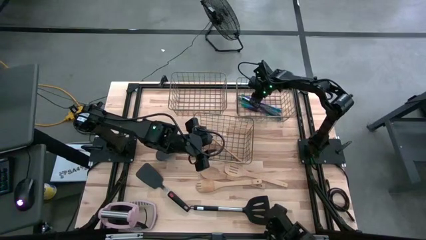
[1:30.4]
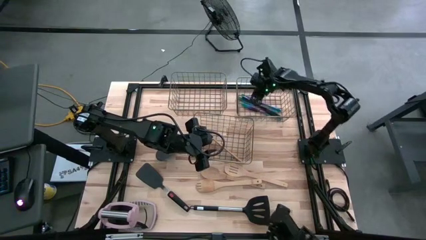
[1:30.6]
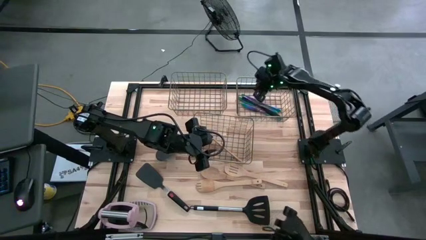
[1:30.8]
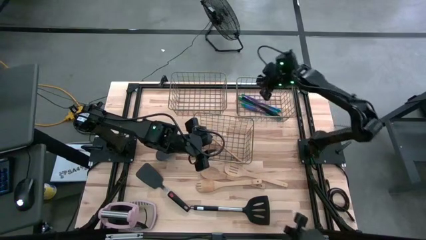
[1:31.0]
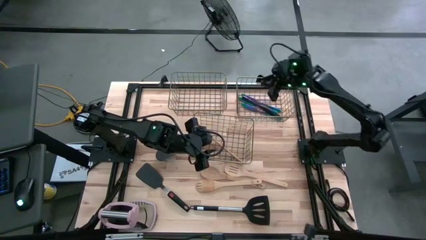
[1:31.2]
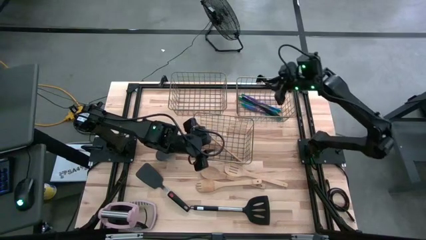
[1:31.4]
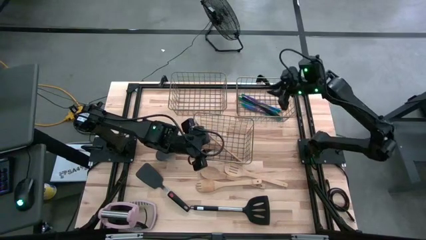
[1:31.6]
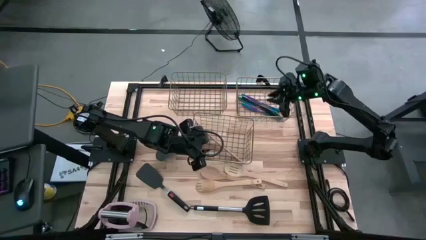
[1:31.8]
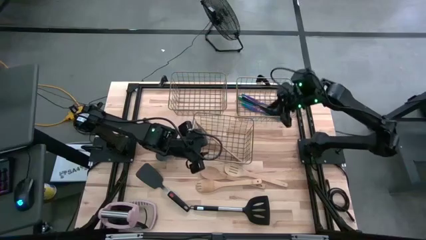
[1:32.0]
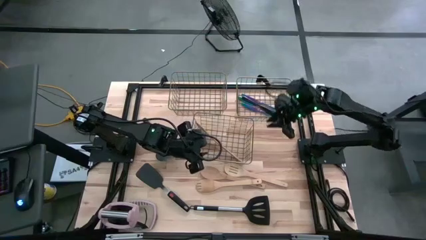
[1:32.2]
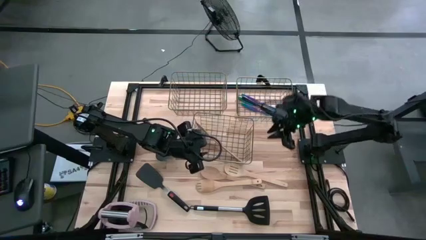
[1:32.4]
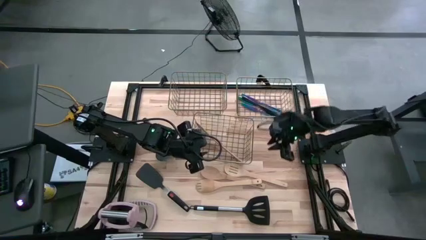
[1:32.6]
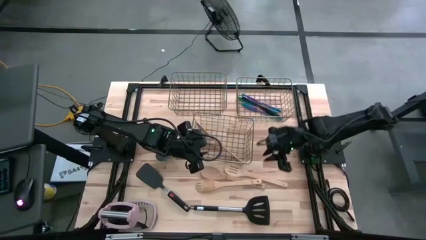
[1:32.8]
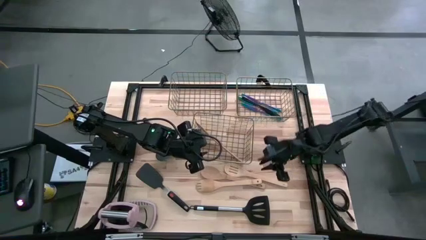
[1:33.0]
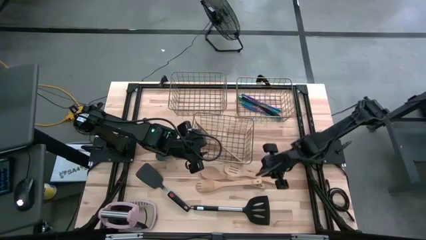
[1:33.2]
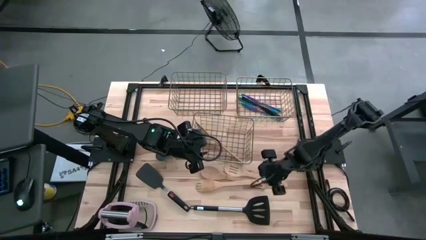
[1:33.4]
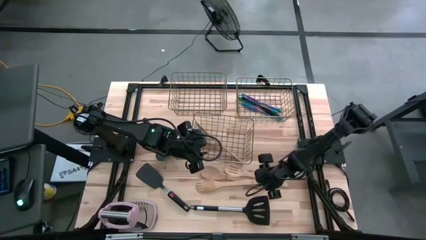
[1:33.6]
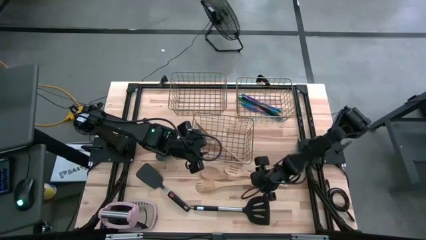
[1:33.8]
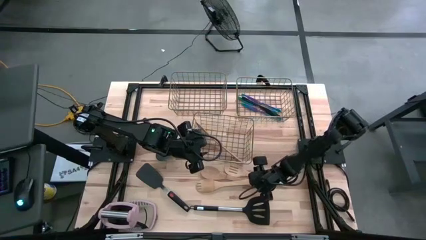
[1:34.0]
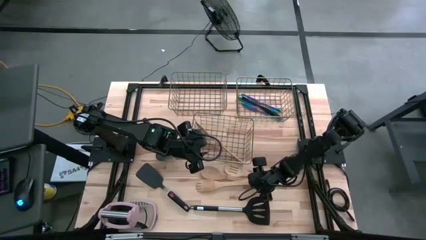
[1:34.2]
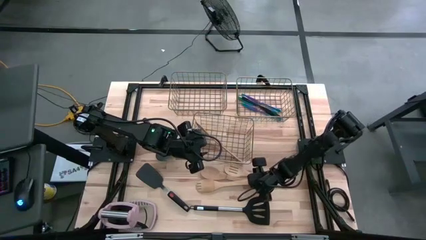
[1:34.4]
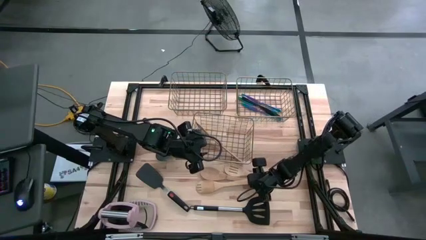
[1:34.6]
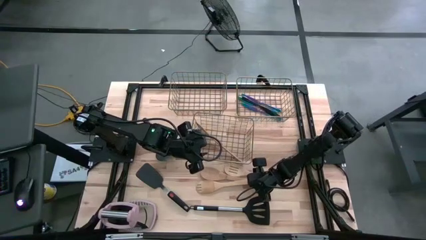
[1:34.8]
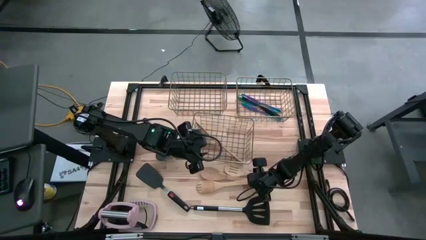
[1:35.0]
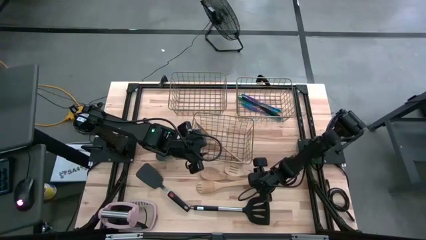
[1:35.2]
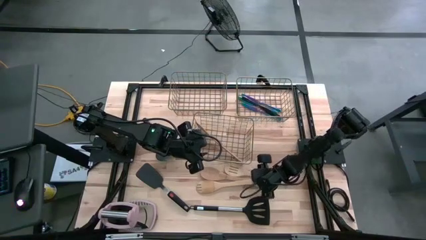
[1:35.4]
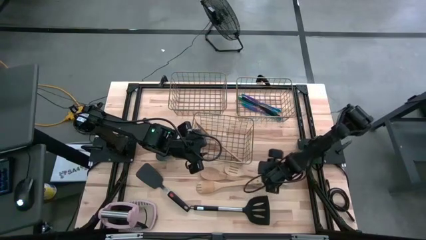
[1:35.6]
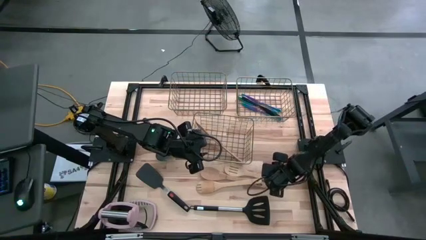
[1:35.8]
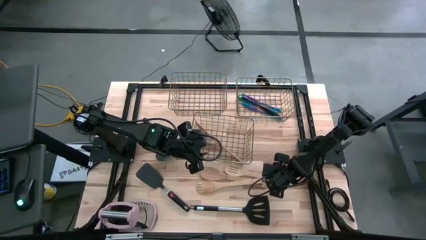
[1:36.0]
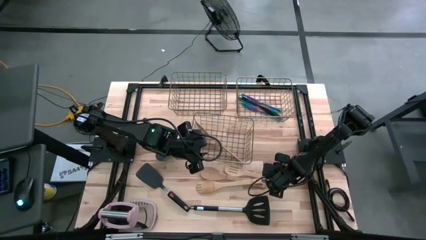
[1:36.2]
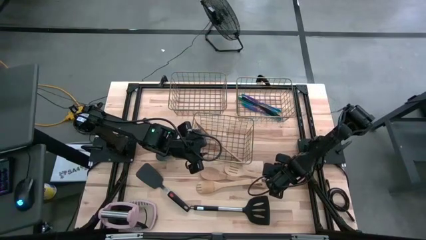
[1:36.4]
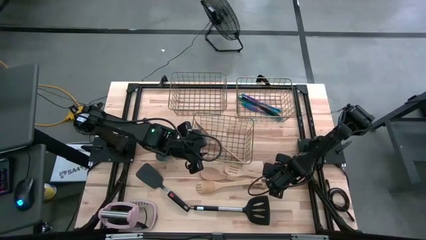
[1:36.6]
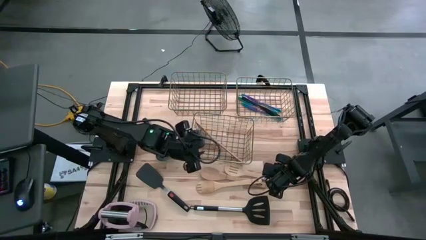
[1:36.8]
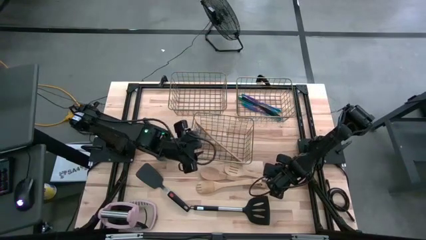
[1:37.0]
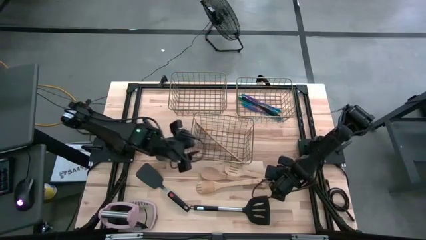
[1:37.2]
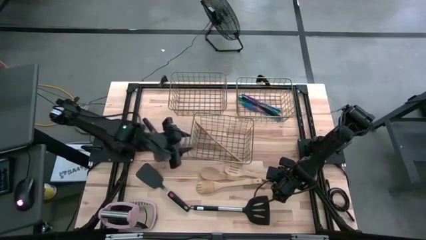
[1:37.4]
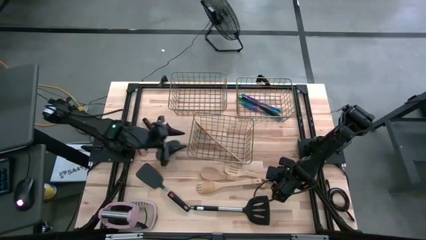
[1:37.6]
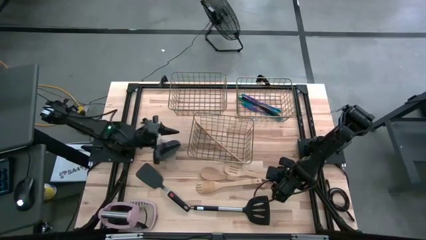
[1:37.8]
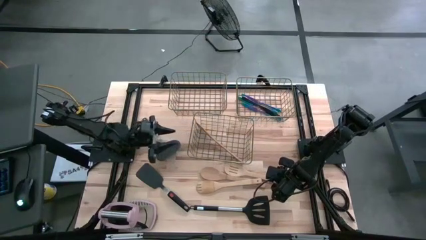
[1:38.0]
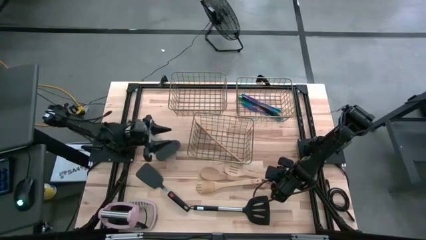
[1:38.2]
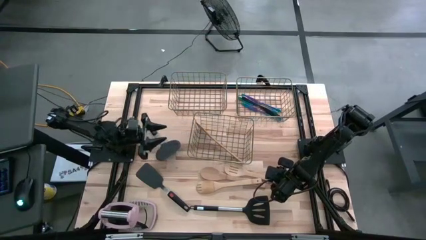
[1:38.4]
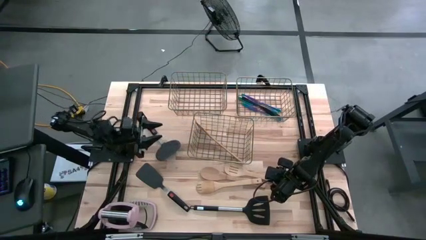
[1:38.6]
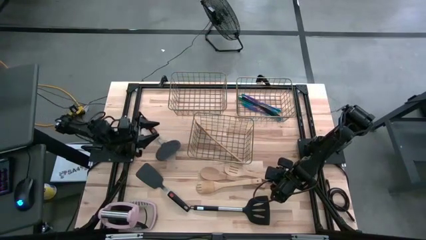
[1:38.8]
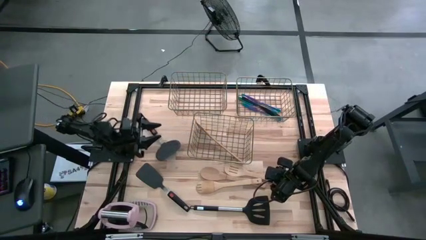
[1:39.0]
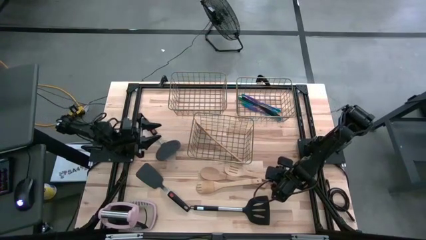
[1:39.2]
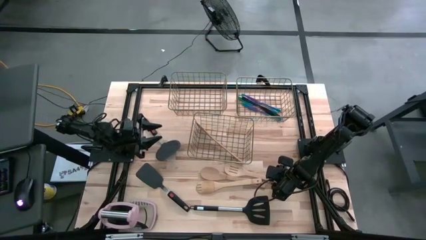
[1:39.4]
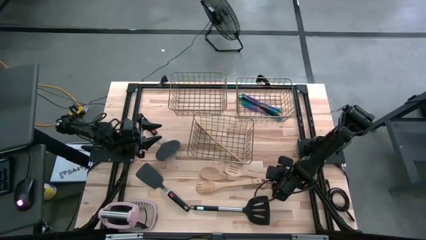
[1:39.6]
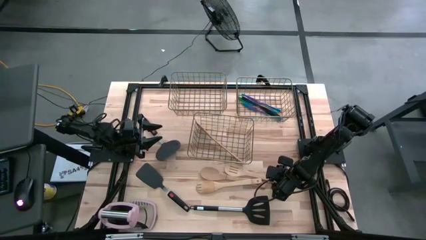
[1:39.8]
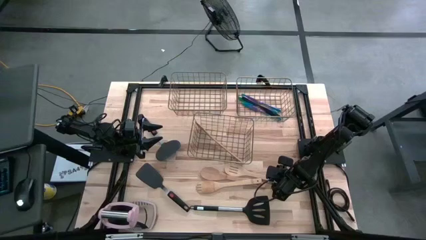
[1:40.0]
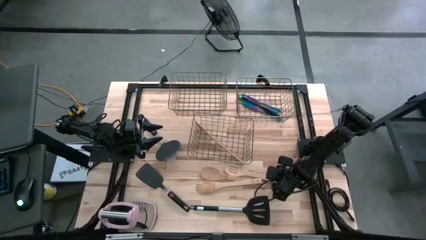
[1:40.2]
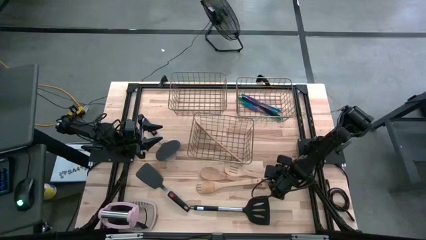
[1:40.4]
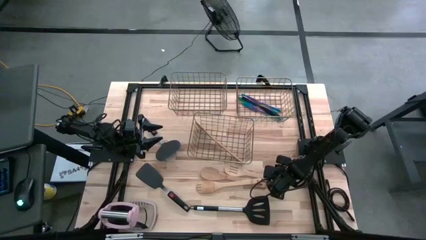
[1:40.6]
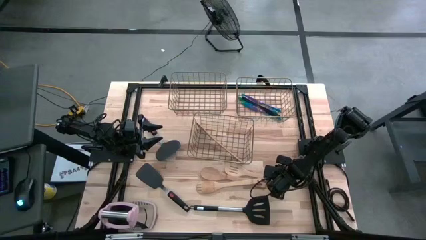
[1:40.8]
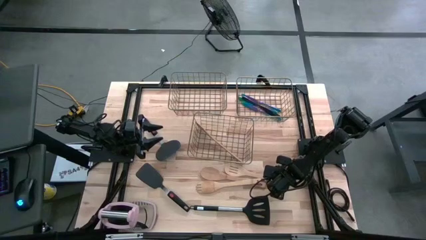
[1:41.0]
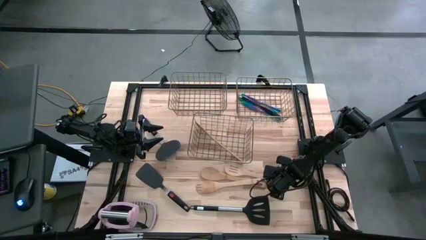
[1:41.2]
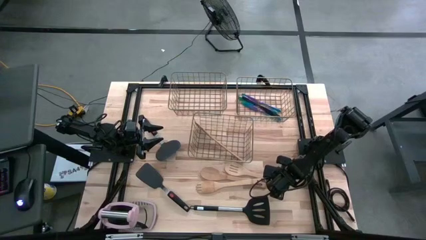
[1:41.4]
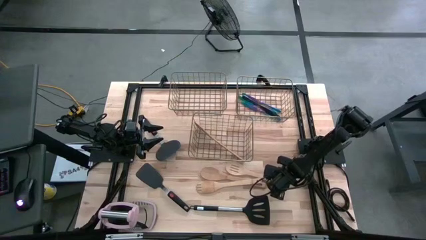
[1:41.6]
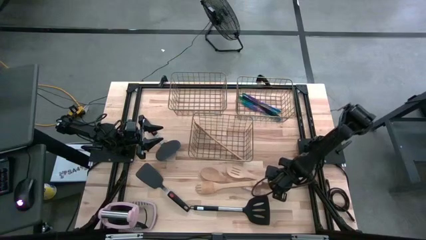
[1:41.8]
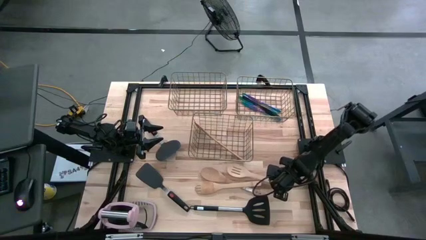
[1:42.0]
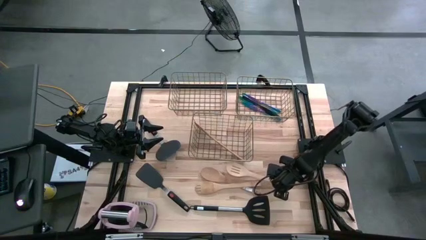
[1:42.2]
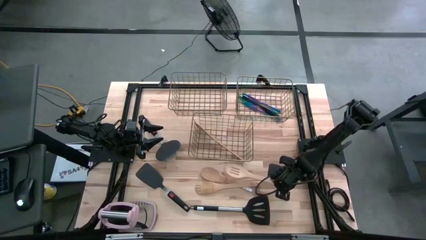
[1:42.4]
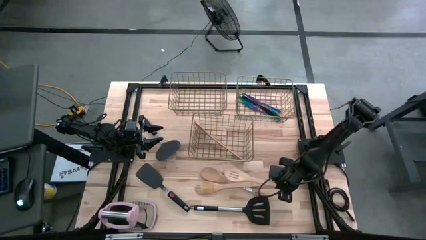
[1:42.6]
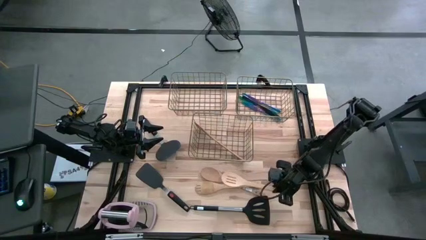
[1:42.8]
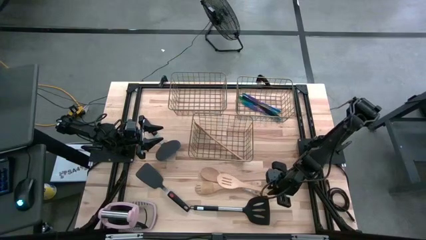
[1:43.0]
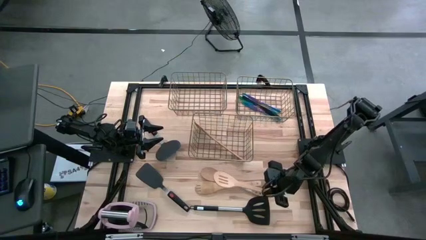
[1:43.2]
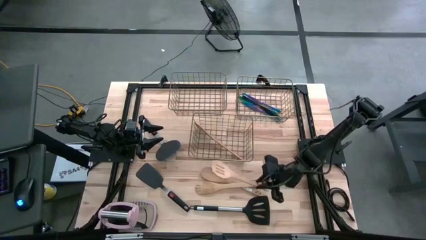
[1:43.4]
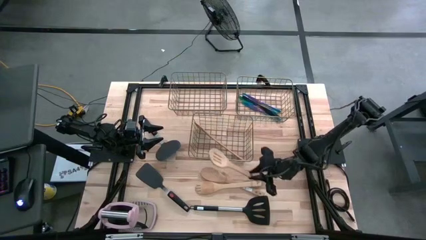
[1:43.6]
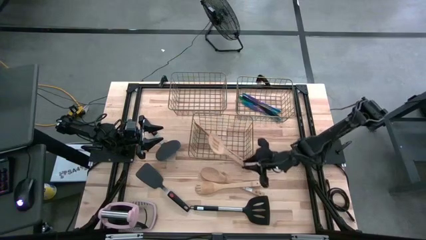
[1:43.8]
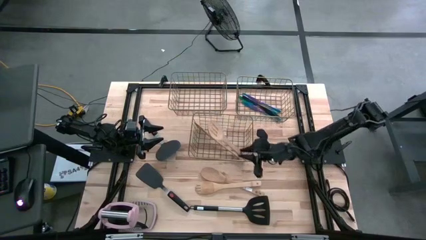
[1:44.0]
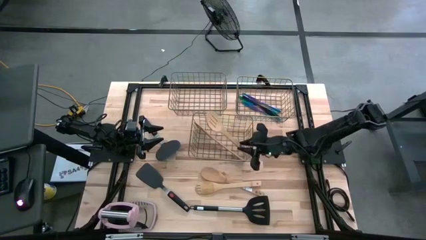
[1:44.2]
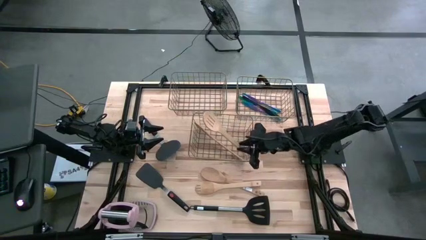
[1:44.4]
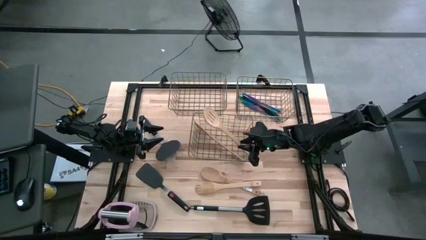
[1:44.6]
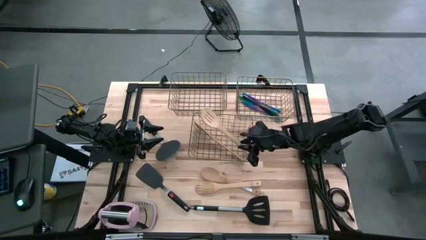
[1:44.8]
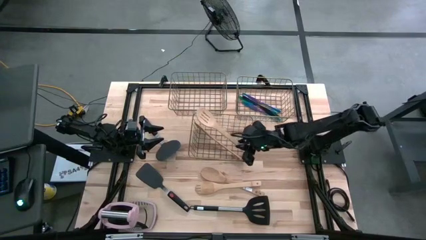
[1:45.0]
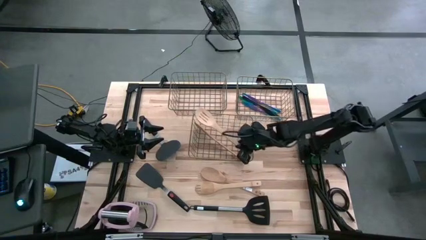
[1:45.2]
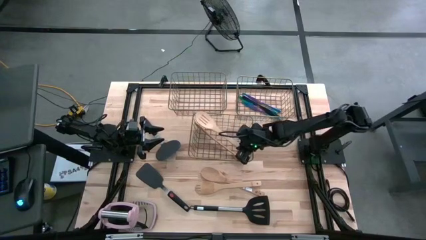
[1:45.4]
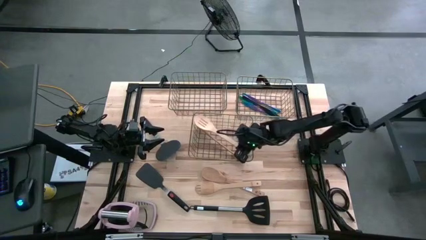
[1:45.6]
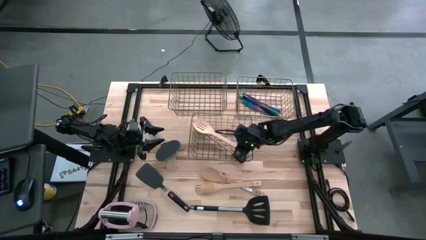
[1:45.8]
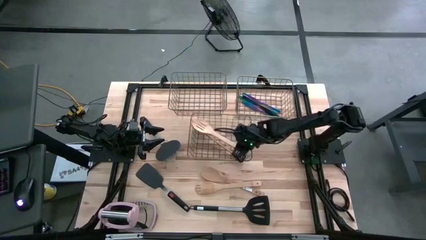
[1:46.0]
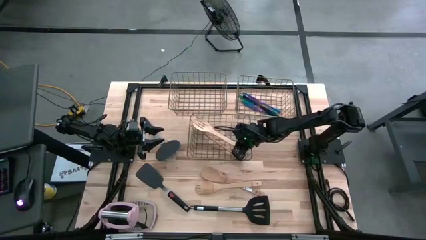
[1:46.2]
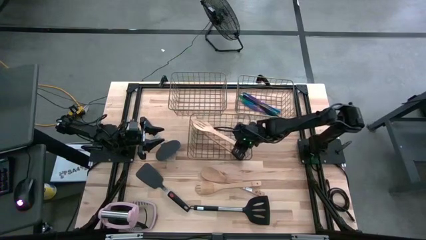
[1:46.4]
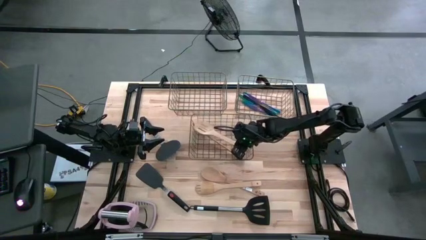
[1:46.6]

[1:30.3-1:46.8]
Task: Pick & Place Kitchen Items
Put the wooden slotted spatula into the bottom wire basket
